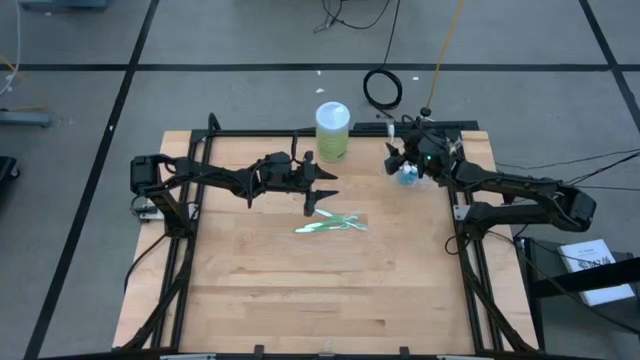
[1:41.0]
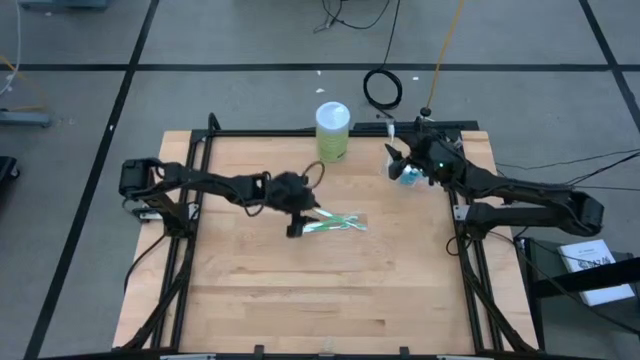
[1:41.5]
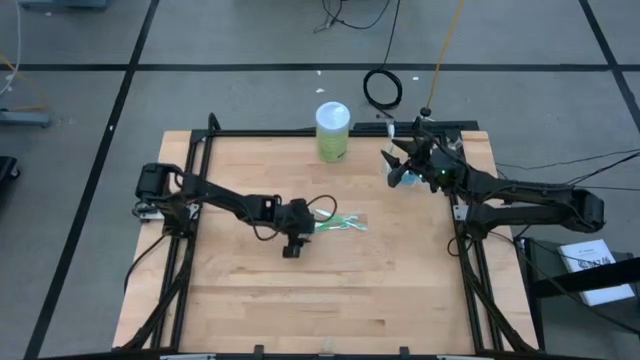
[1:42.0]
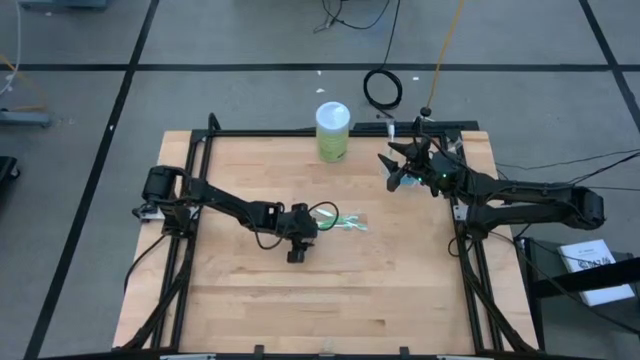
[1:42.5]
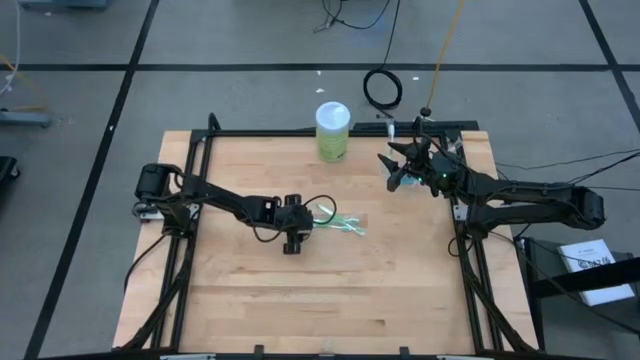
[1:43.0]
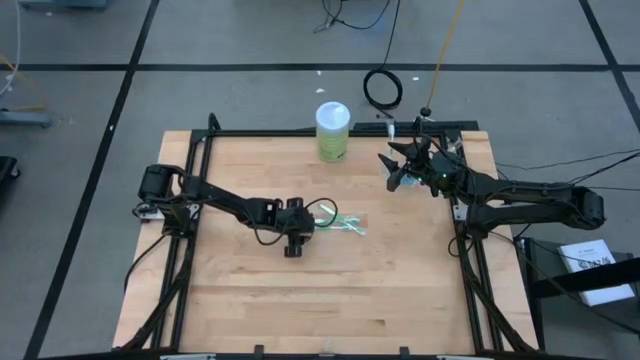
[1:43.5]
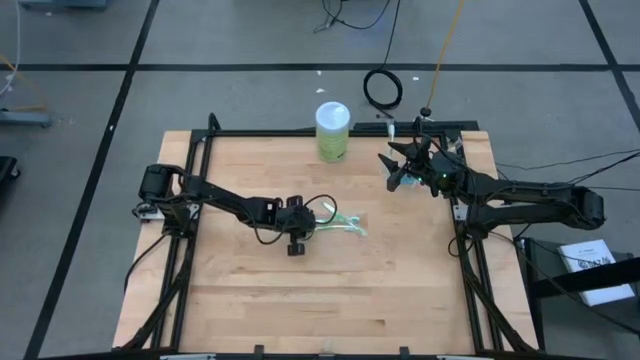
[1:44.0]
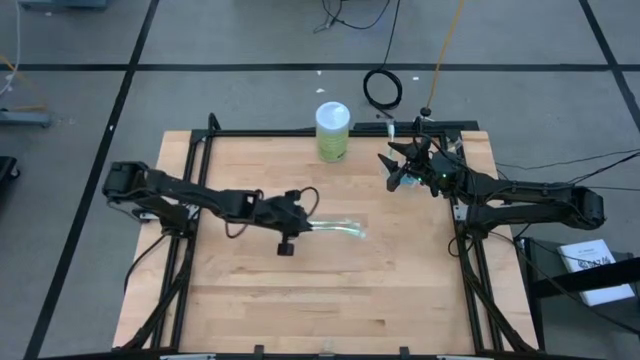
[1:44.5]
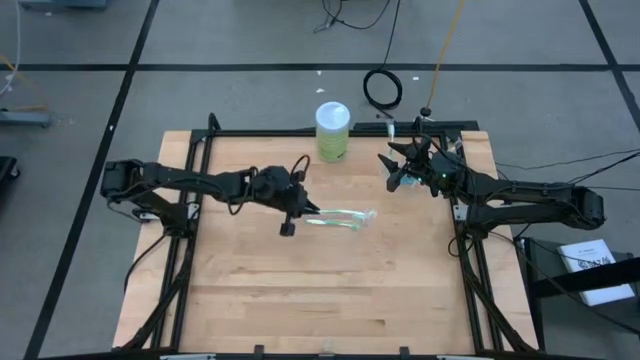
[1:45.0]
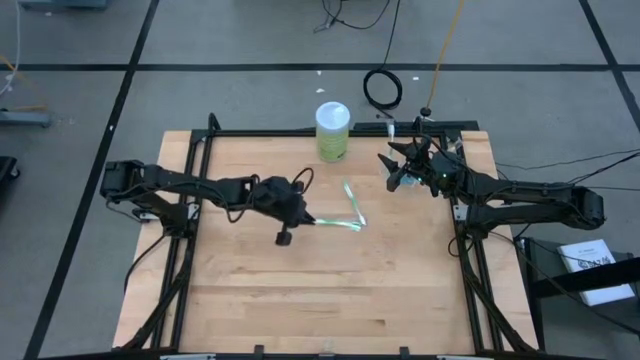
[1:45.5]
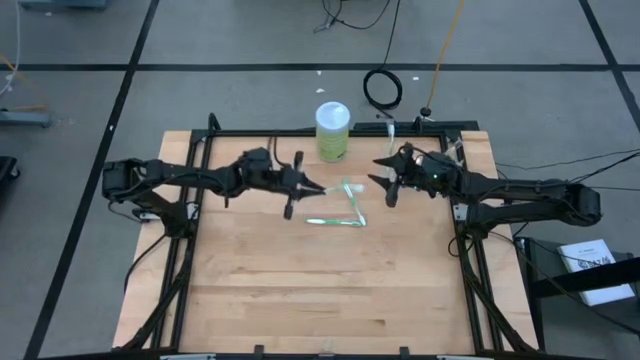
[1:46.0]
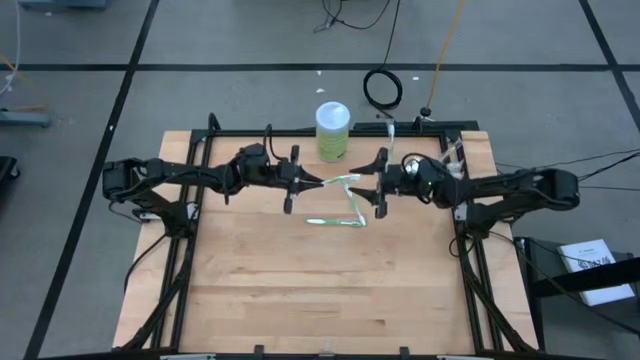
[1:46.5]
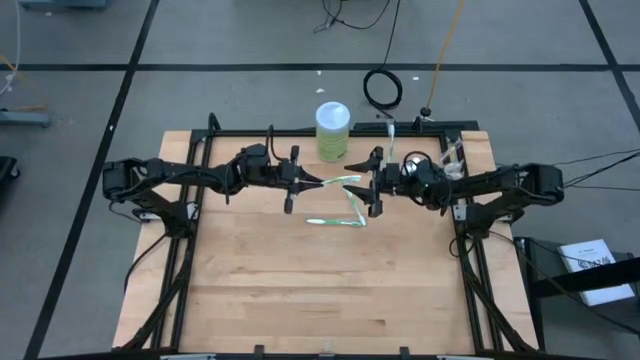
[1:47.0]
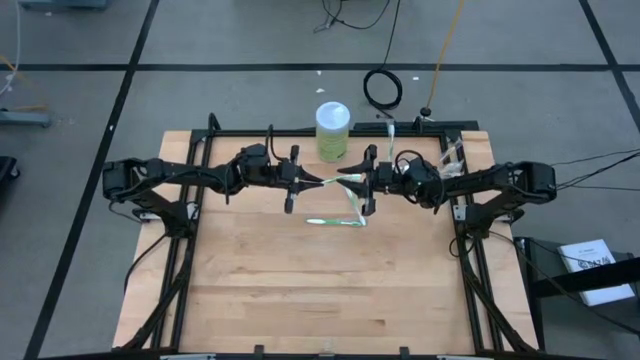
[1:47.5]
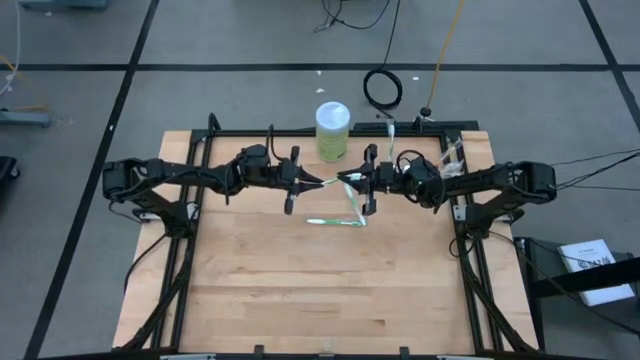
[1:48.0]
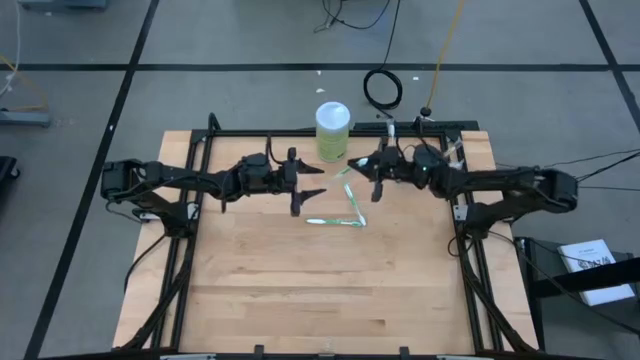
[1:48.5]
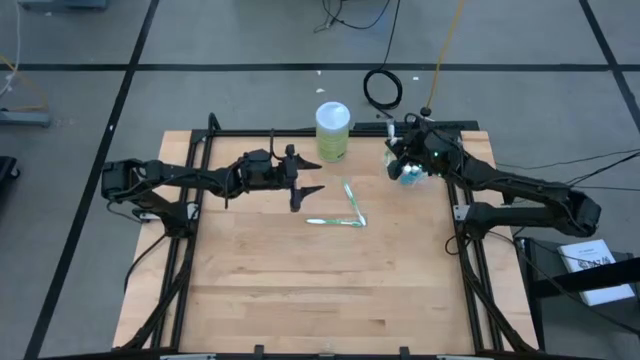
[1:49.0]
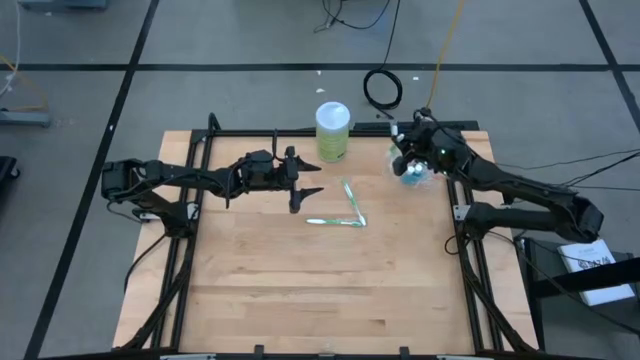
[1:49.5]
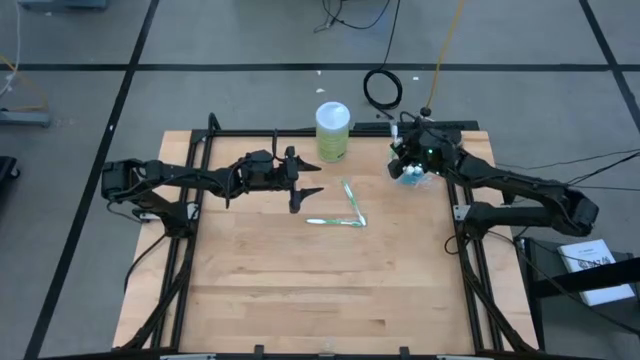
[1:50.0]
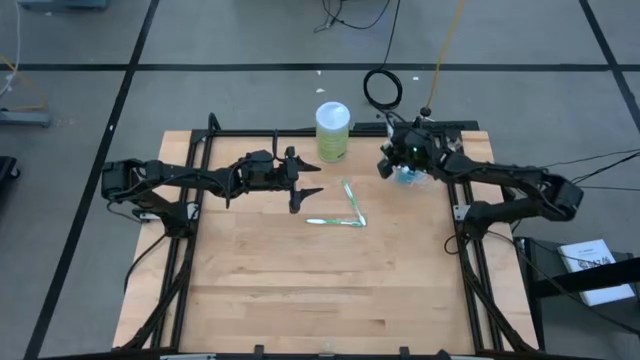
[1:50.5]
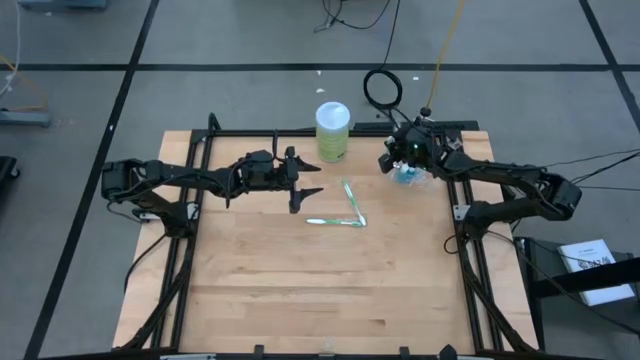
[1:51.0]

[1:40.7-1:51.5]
Task: Pick & Place toothbrushing station
Put the green toothbrush into the transparent organizer

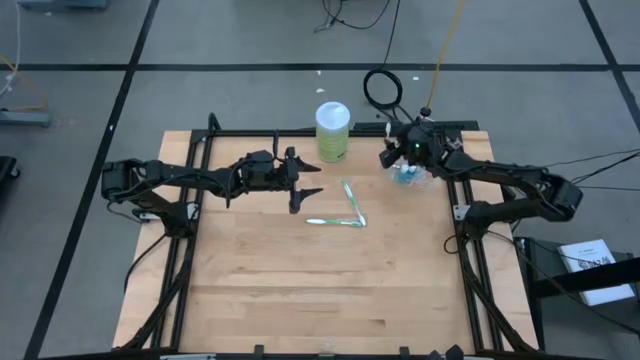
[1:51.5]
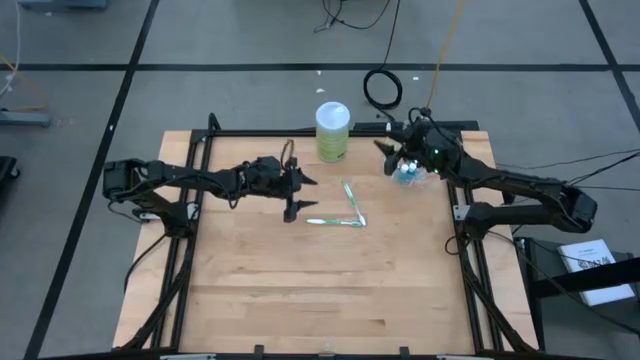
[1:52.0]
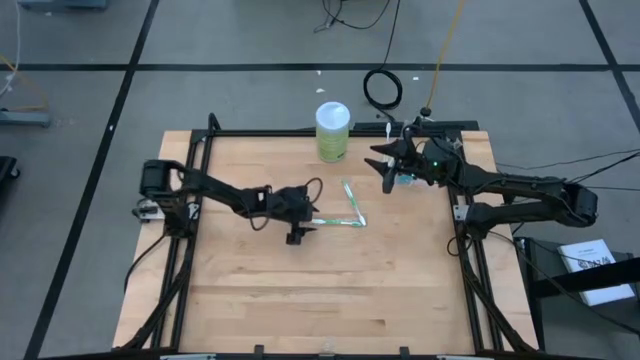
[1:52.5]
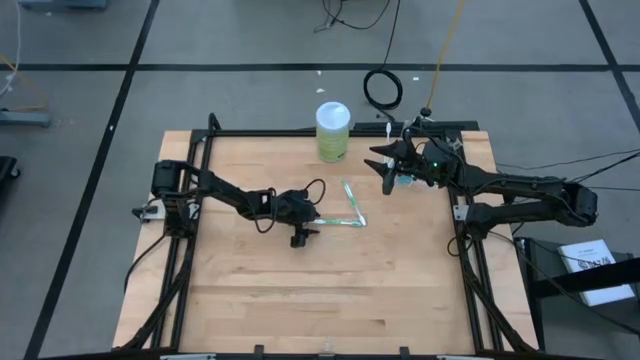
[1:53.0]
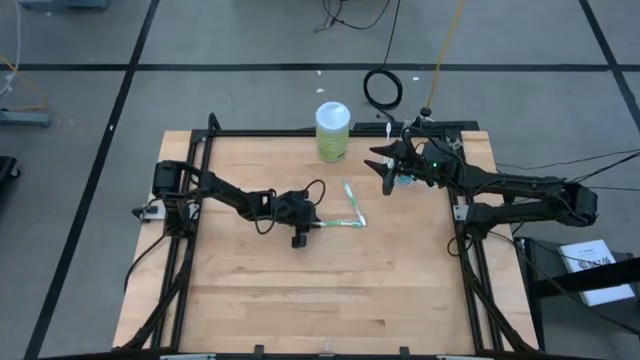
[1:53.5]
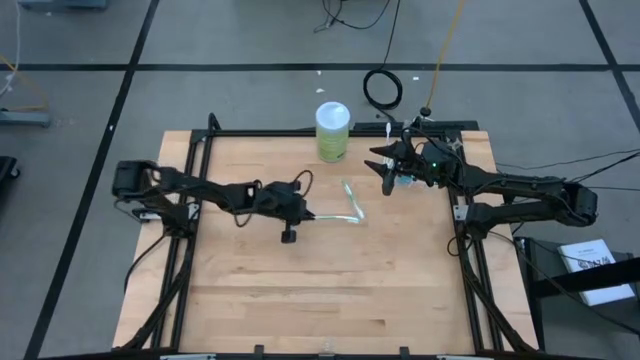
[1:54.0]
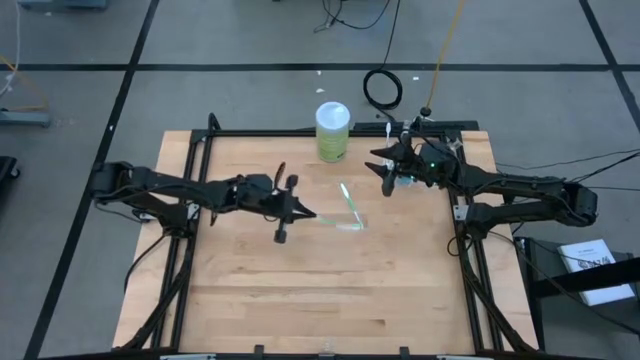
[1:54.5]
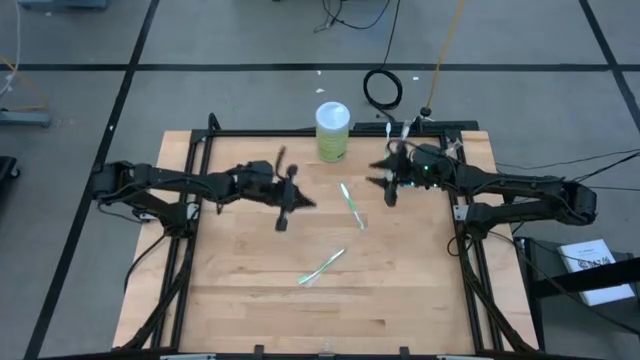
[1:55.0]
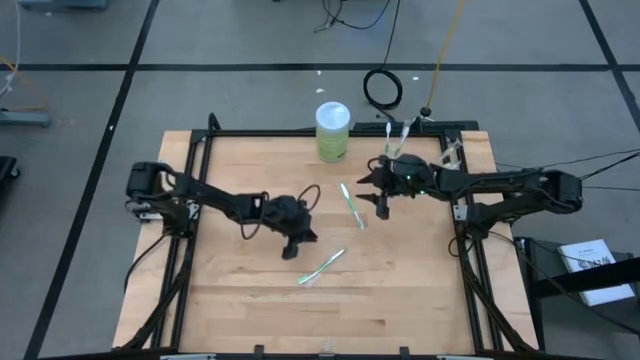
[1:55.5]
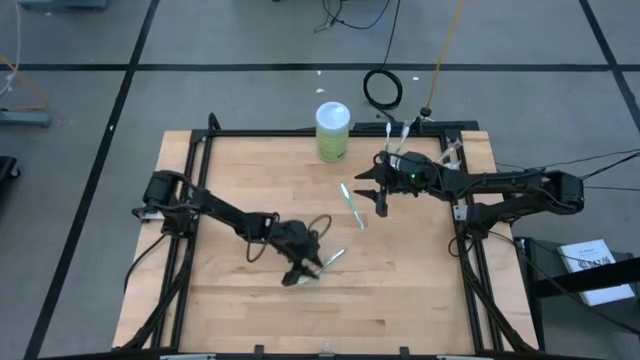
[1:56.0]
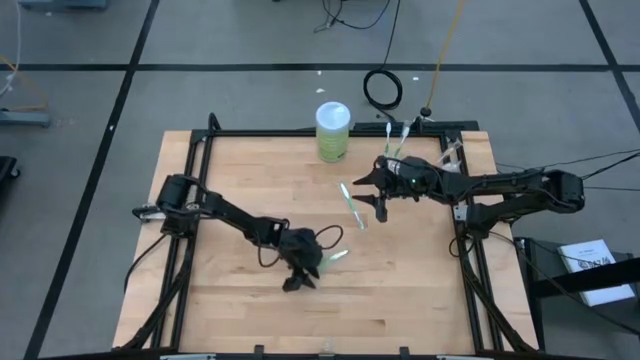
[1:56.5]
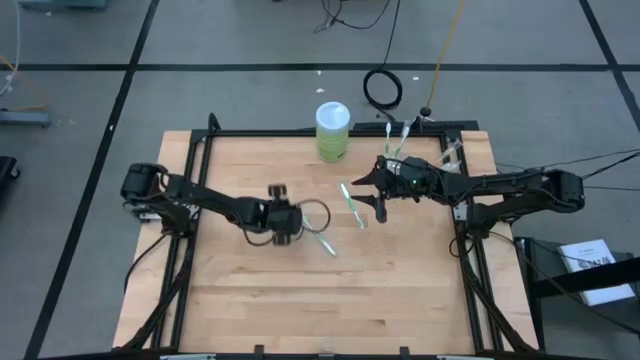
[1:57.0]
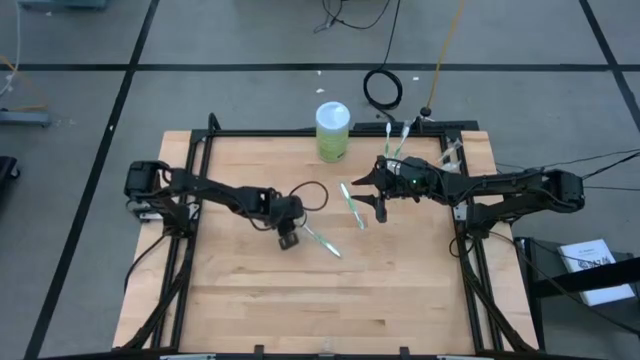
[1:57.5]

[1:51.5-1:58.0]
Put the green toothbrush into the transparent organizer

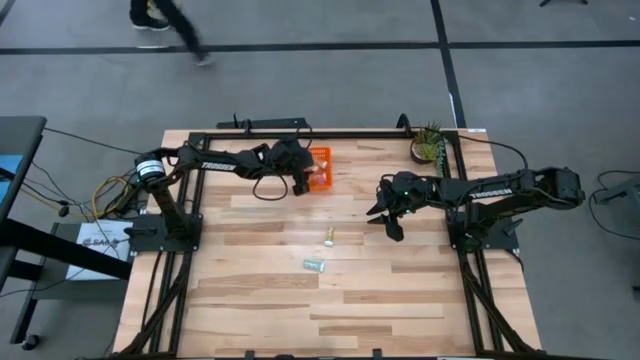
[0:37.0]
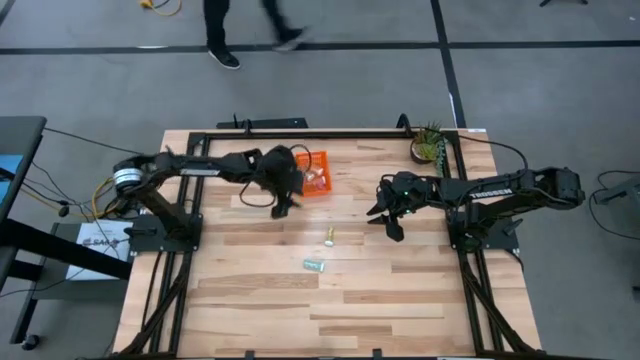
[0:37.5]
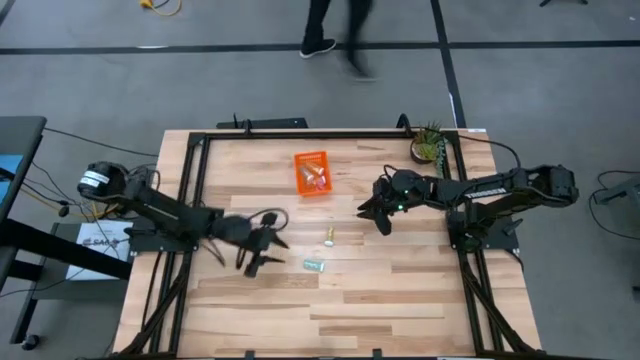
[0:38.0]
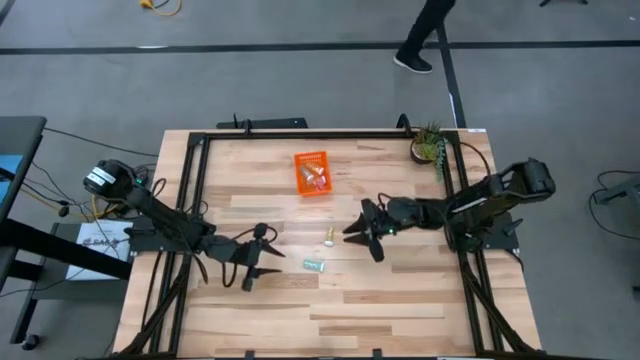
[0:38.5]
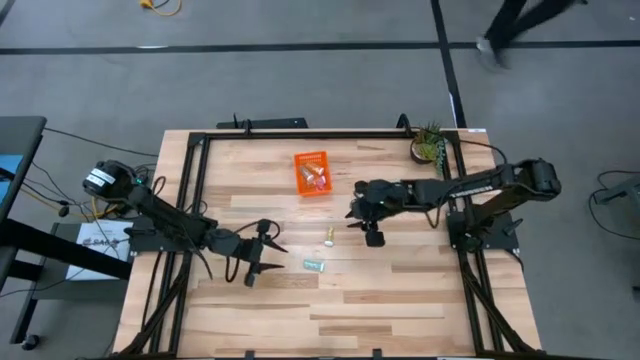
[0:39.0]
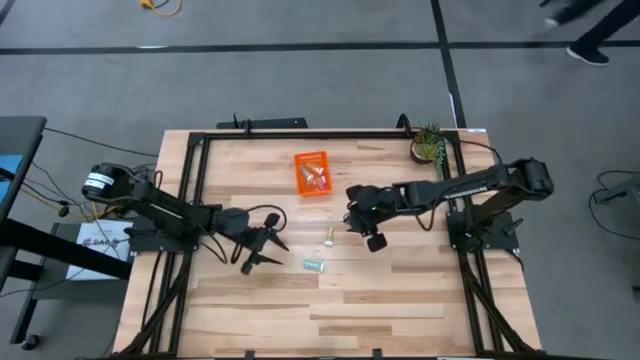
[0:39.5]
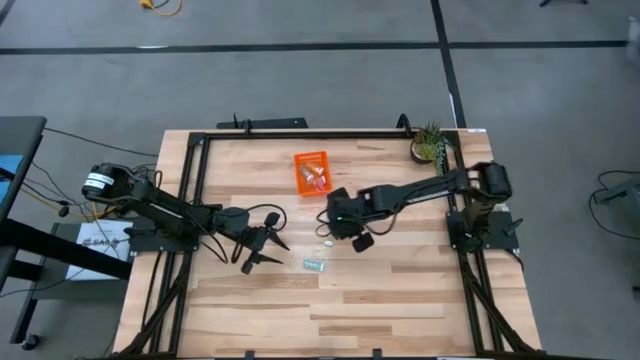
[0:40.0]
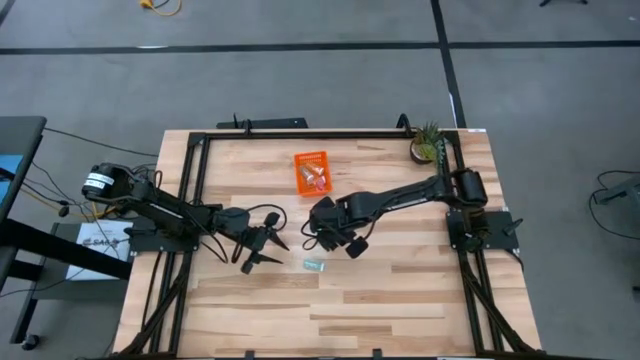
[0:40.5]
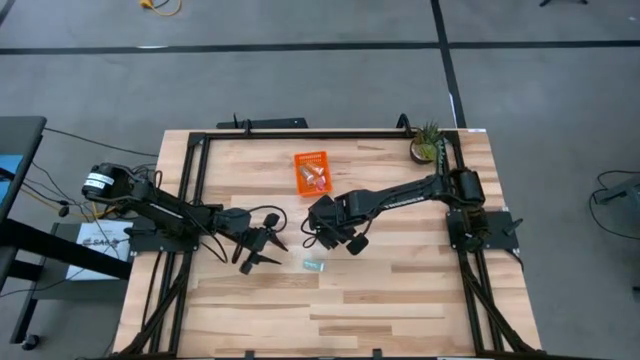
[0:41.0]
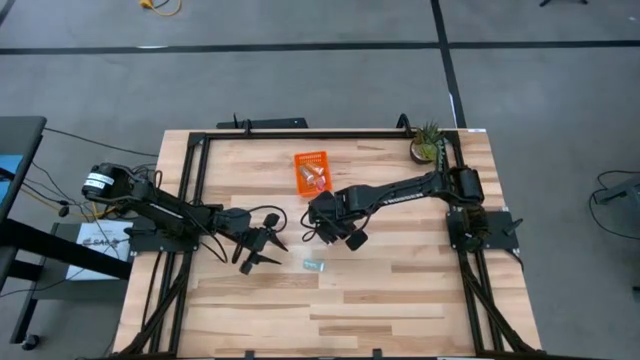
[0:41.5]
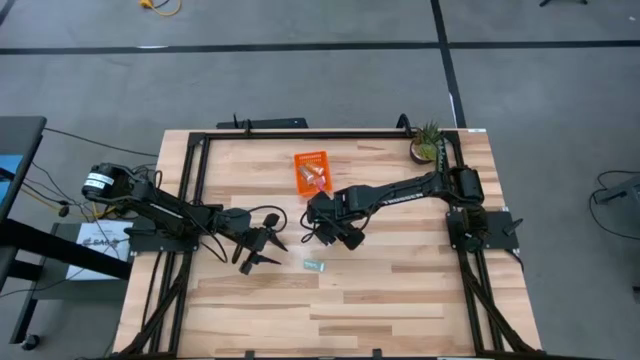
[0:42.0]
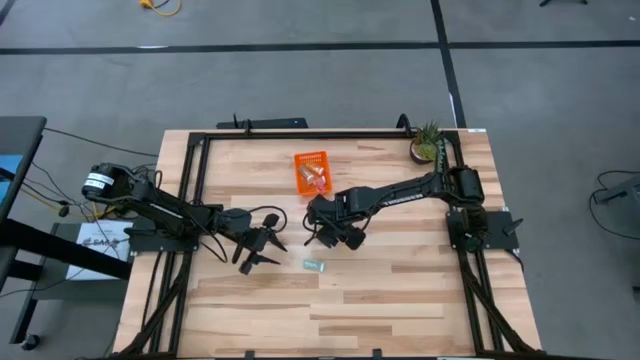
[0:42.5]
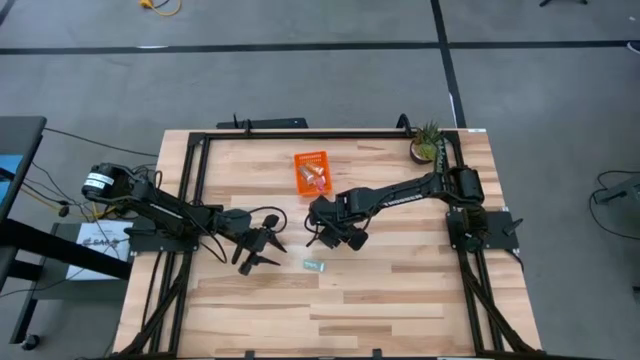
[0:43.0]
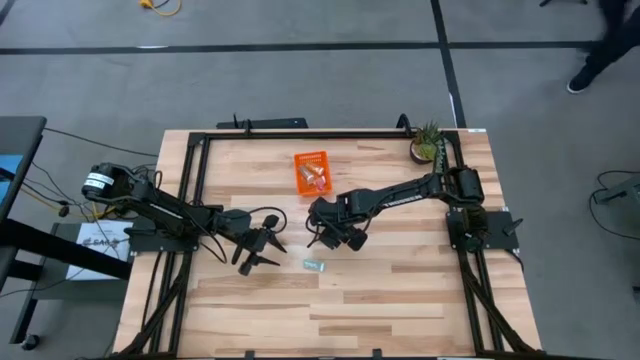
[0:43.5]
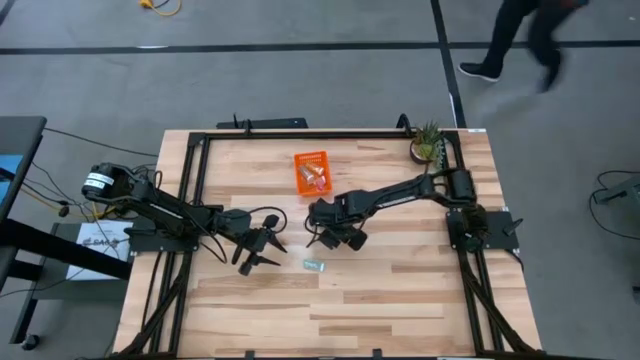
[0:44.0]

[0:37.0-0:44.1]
Task: Pick and place pill bottles into a basket
Put the yellow pill bottle into the orange bin
